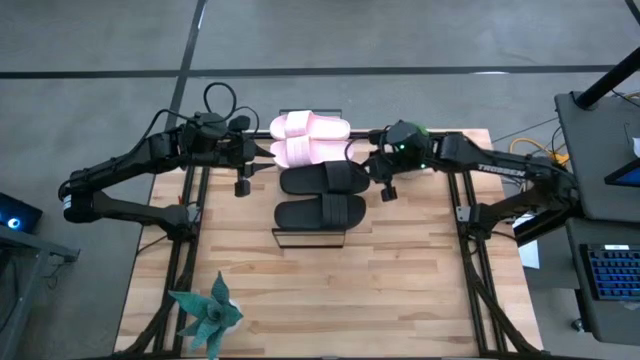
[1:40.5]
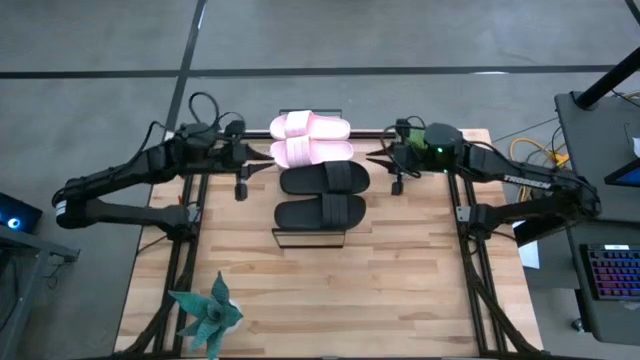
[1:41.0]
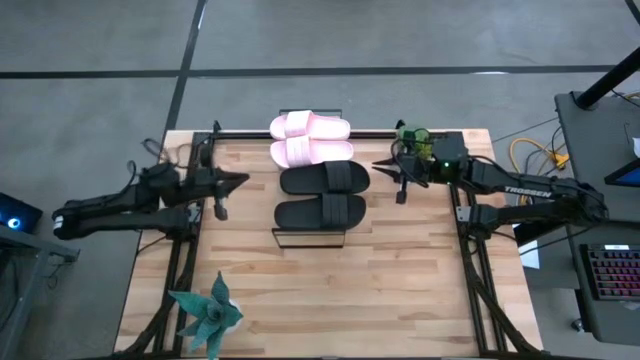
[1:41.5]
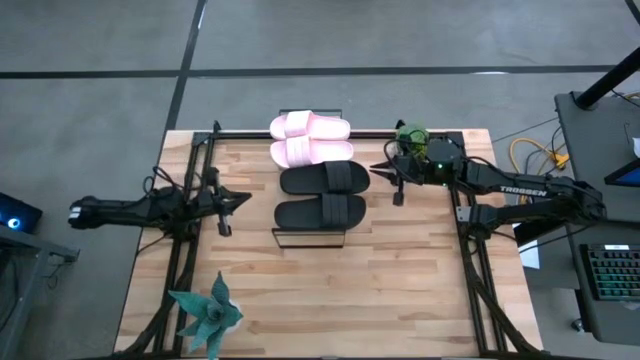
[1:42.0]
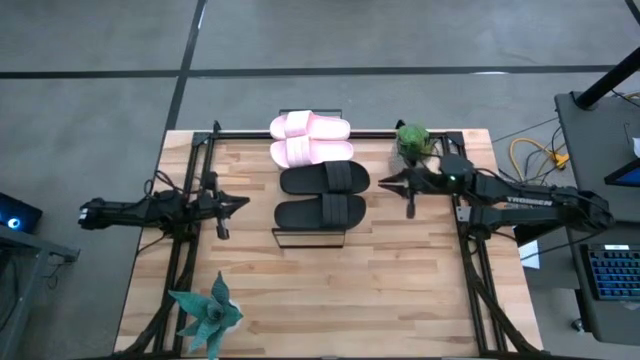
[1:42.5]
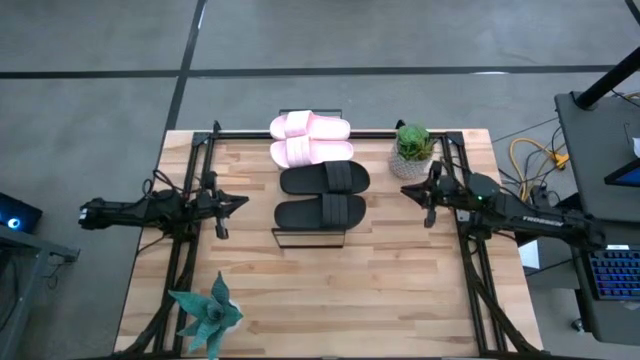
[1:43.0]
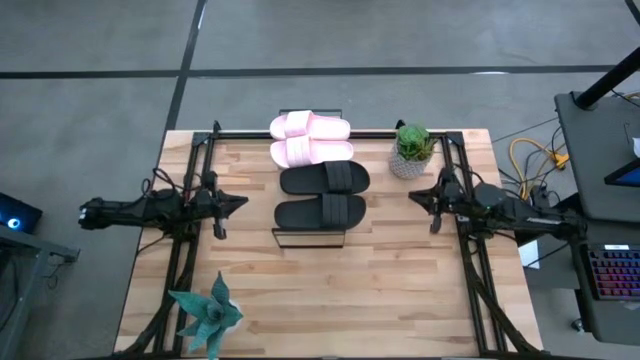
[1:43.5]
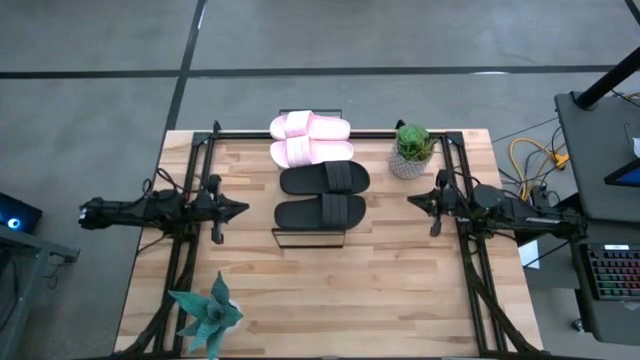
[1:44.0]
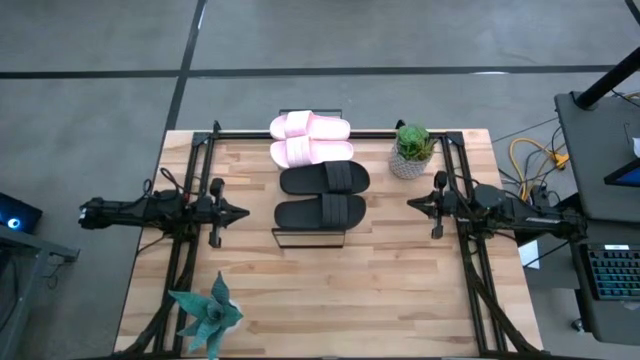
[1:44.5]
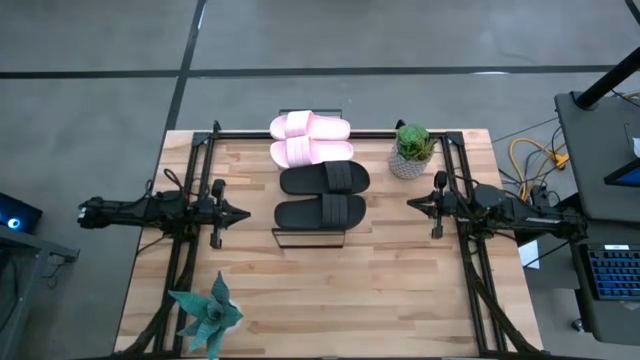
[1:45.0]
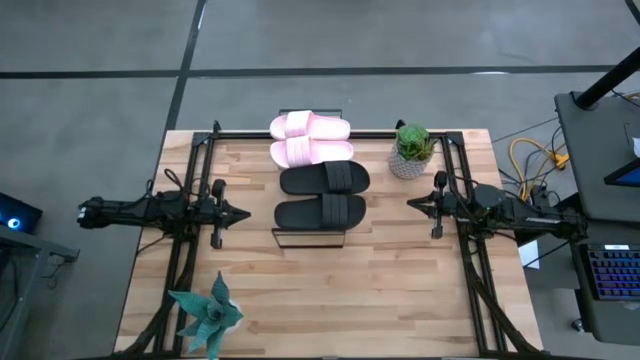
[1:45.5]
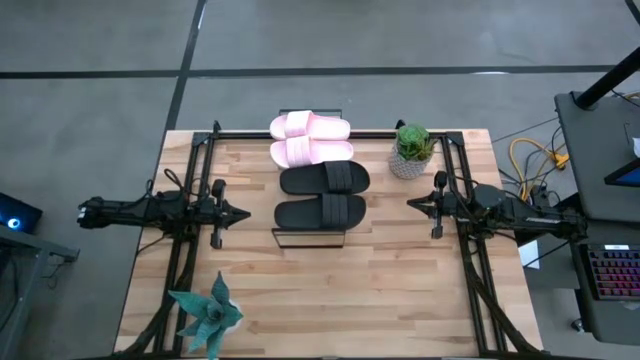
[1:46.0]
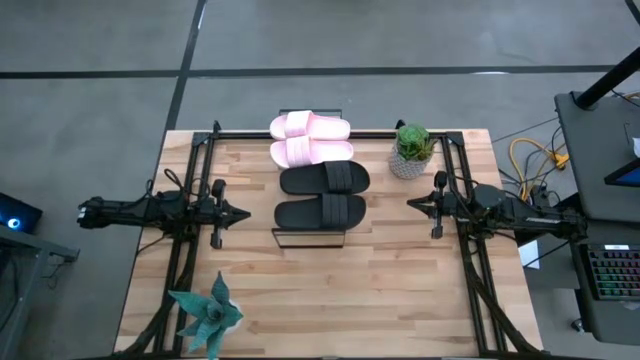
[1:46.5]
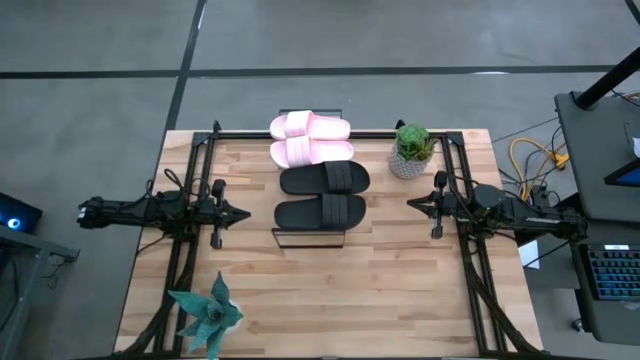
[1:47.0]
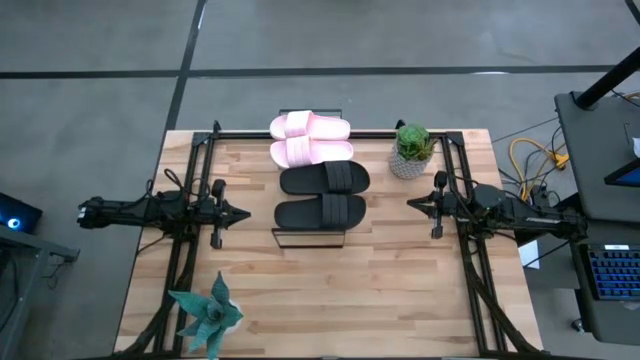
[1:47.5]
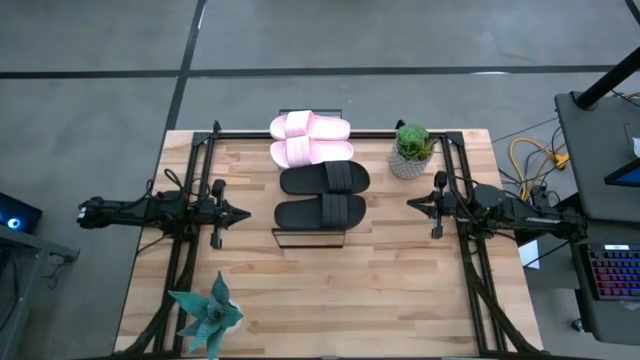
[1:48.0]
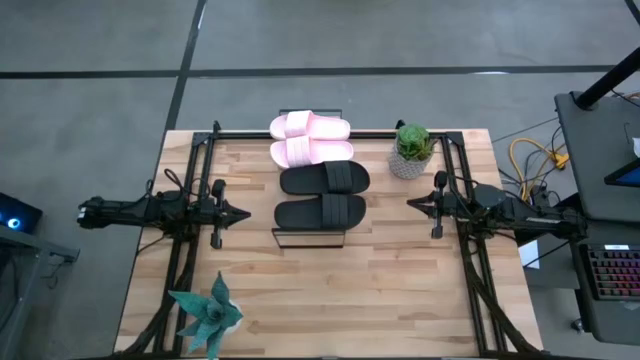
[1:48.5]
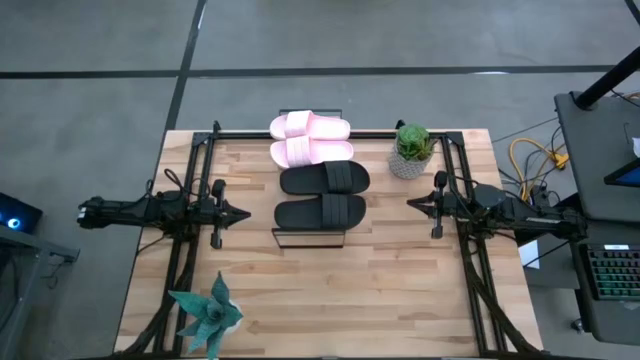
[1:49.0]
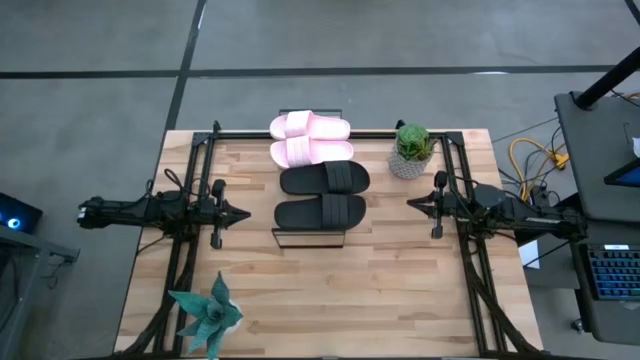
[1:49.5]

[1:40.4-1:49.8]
Task: Pick and place slides into the shelf
Return to Home Position

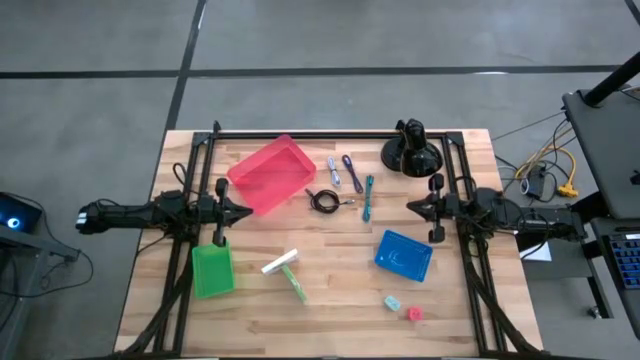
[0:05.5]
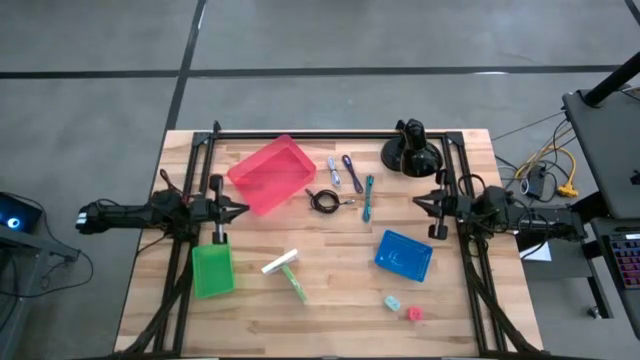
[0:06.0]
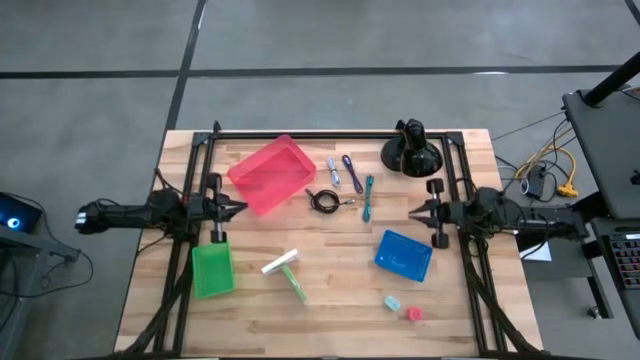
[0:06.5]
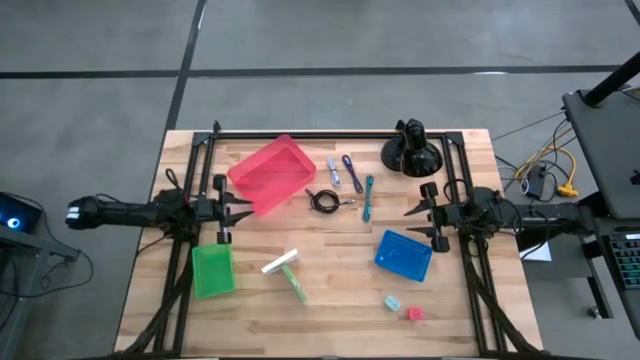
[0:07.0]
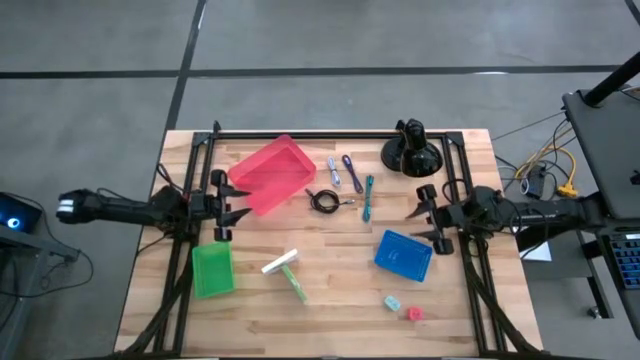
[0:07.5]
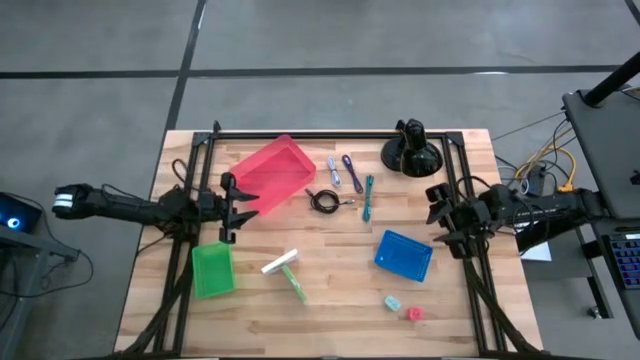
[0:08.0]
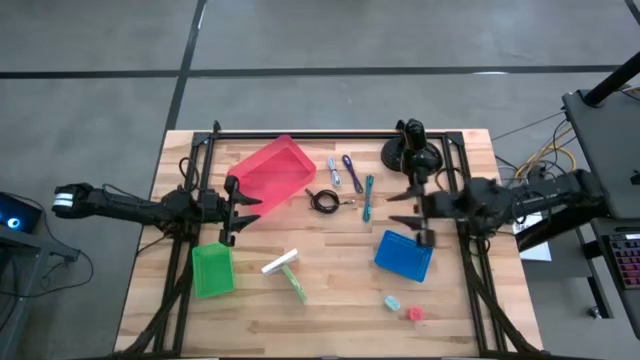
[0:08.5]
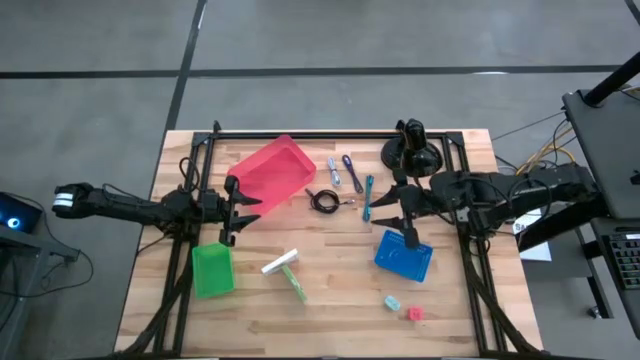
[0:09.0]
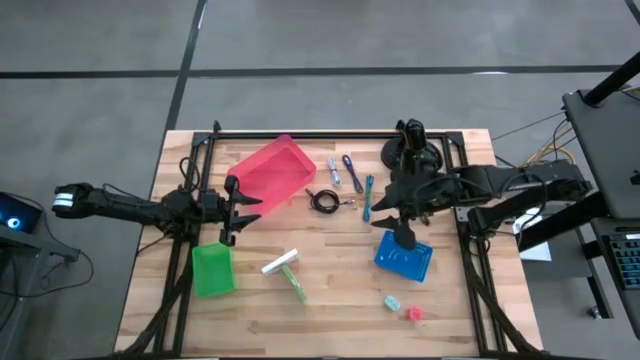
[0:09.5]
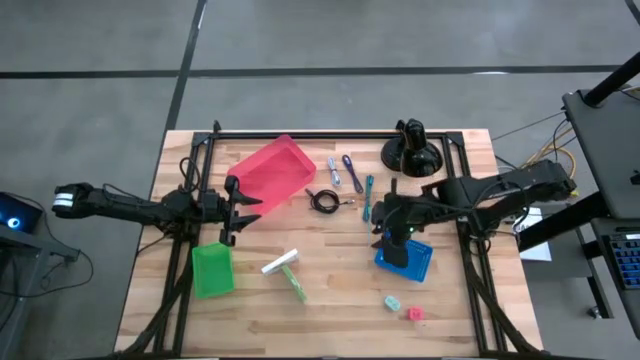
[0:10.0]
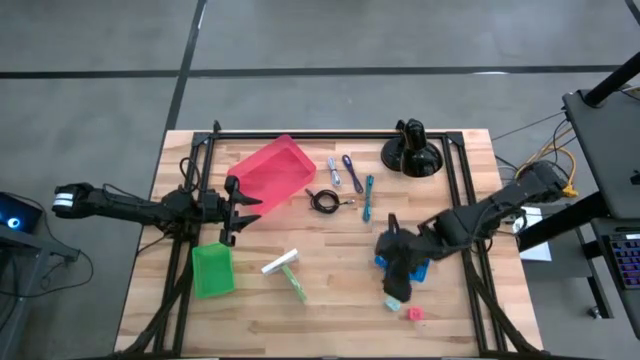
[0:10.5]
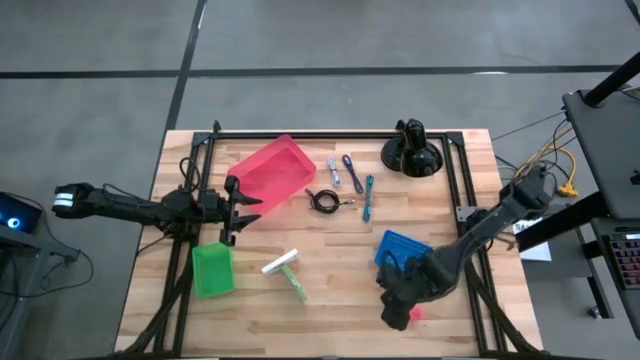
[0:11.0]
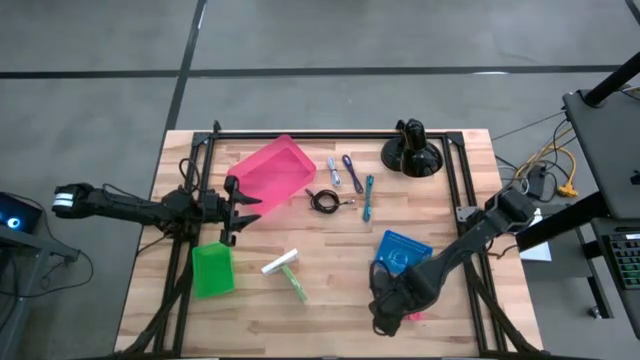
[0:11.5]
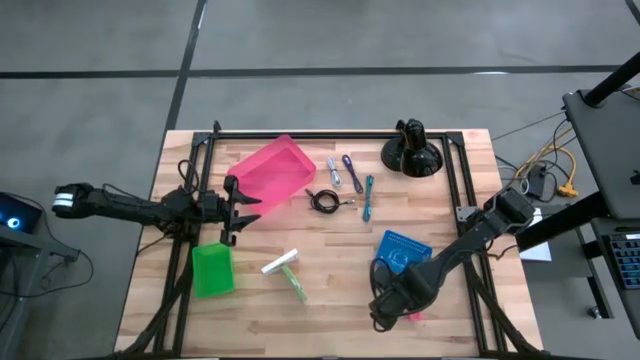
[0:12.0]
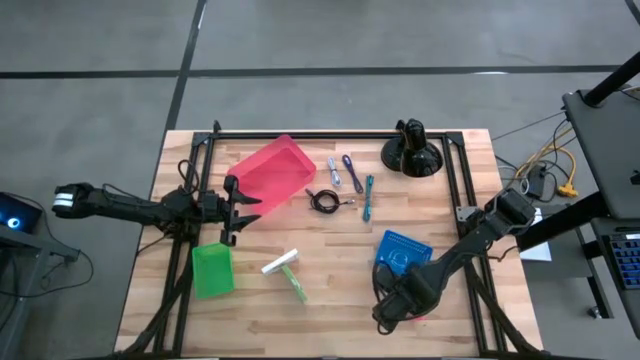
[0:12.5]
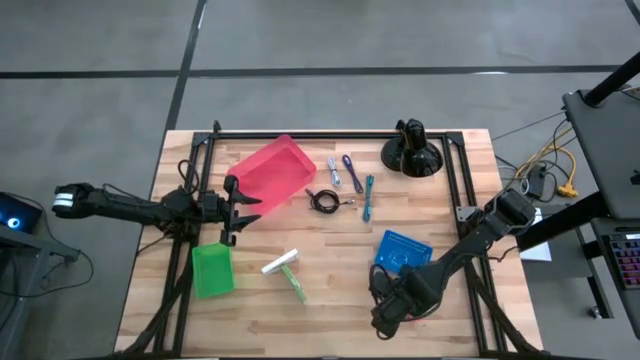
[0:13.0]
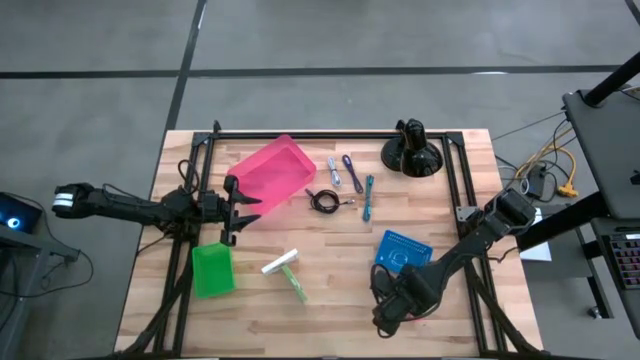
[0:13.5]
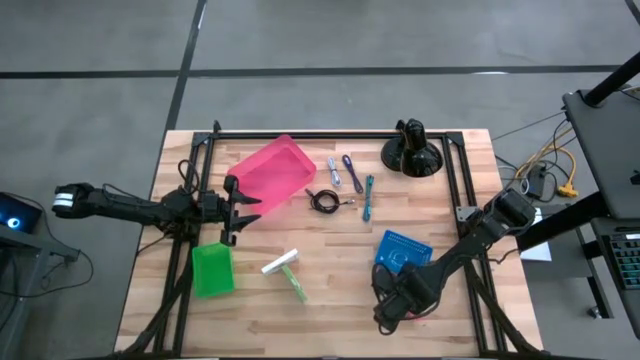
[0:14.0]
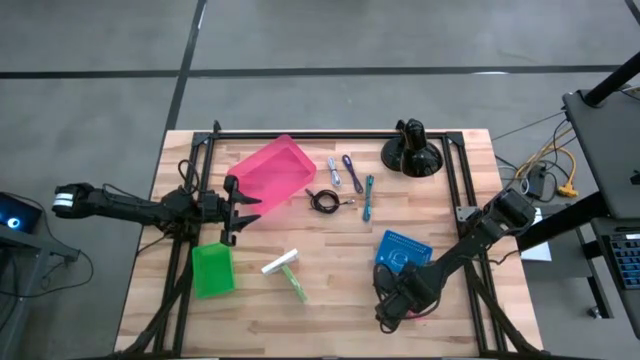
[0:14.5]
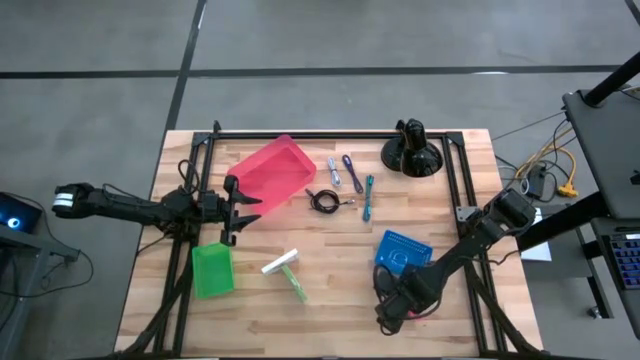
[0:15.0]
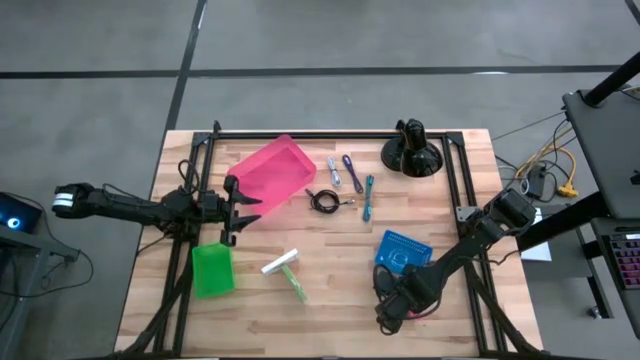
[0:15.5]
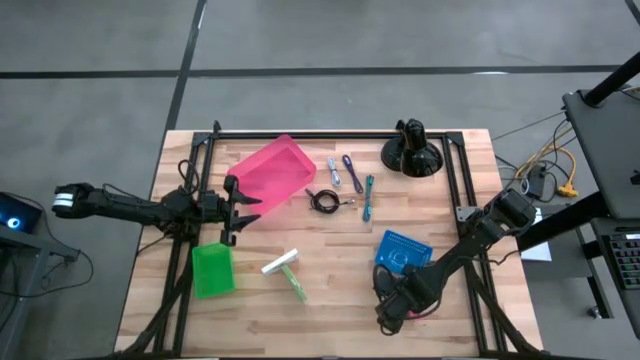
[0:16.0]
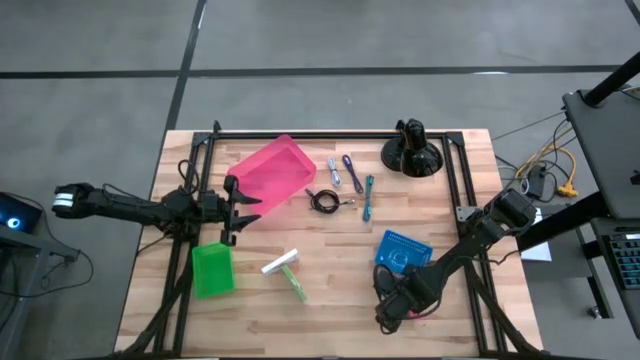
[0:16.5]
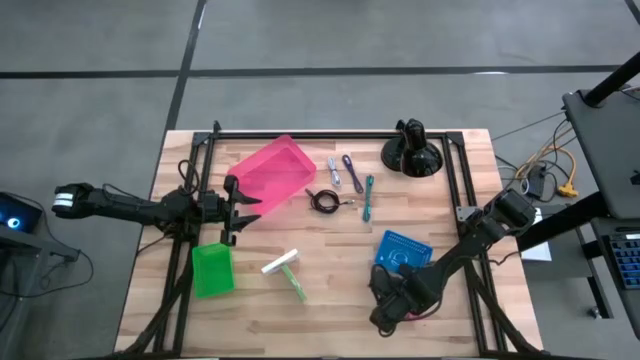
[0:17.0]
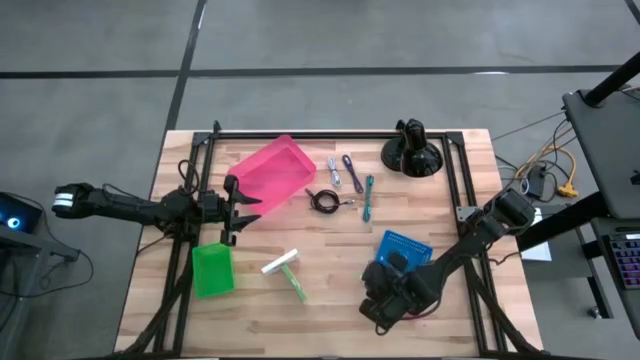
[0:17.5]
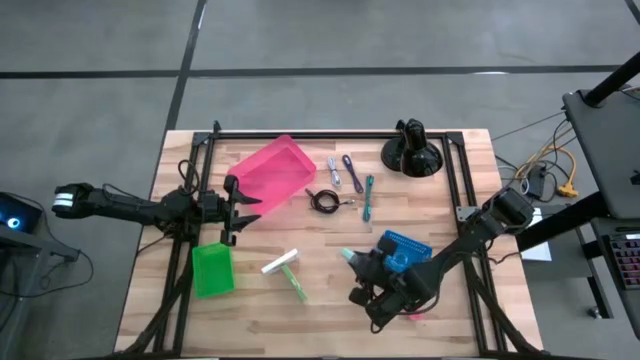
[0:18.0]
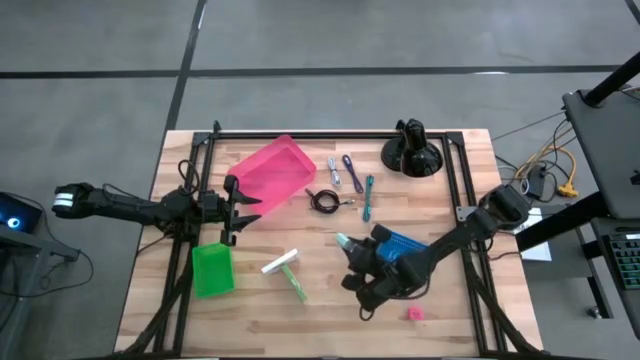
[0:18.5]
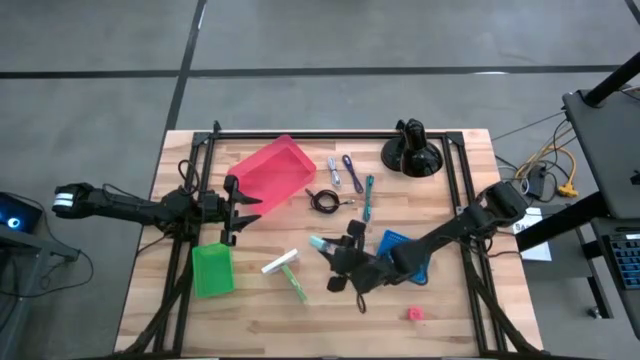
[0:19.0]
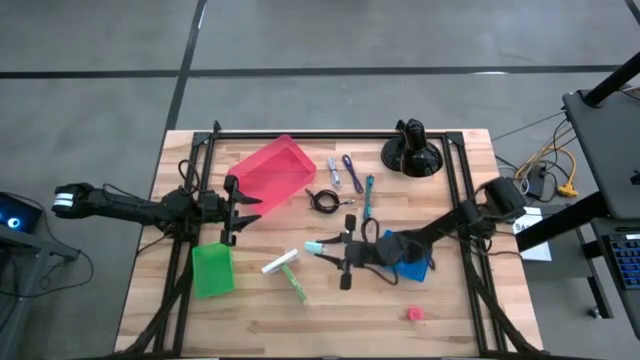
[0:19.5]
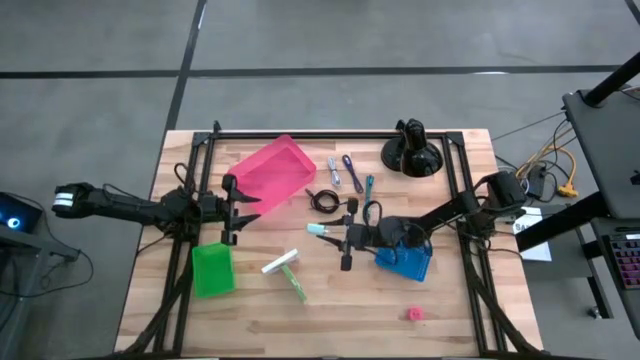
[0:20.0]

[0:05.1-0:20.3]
Task: Pick and place items into bin
Put the blue charger adapter into the green bin
